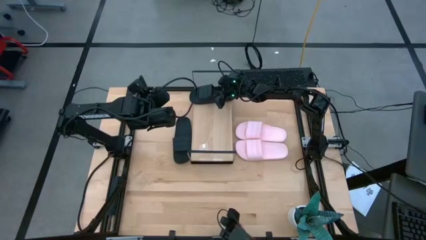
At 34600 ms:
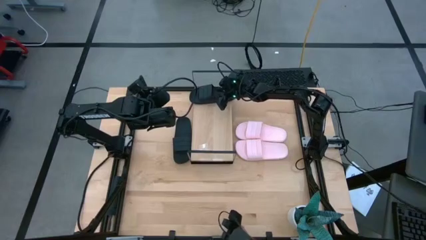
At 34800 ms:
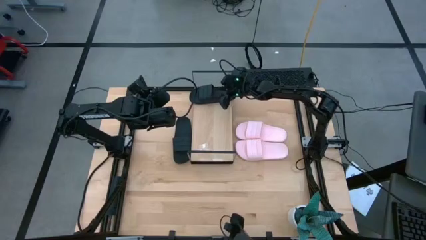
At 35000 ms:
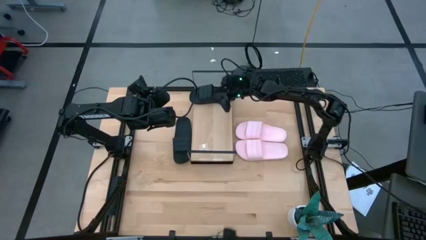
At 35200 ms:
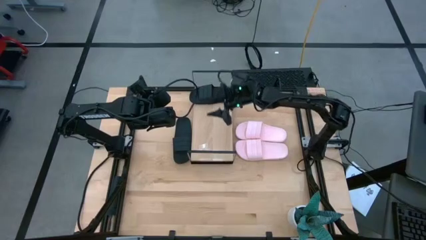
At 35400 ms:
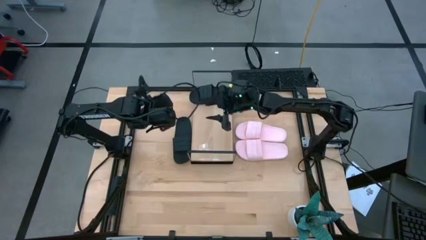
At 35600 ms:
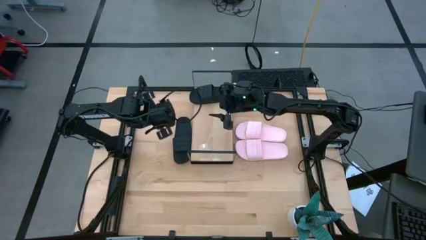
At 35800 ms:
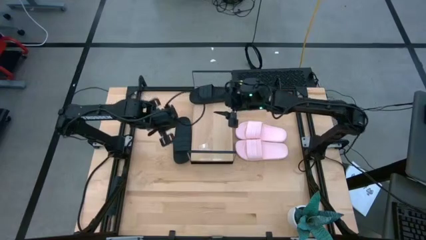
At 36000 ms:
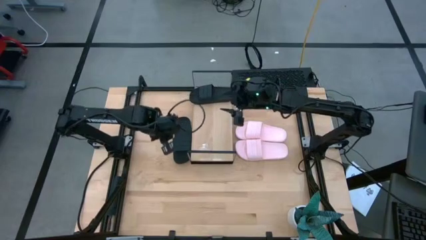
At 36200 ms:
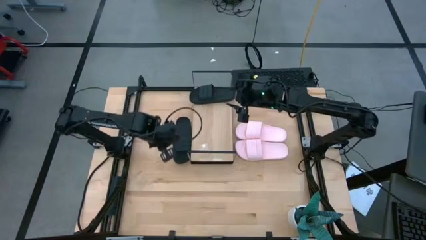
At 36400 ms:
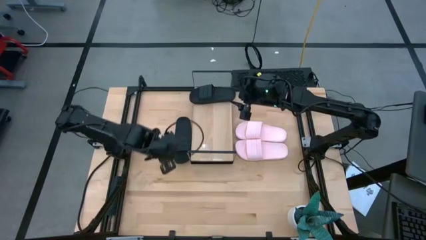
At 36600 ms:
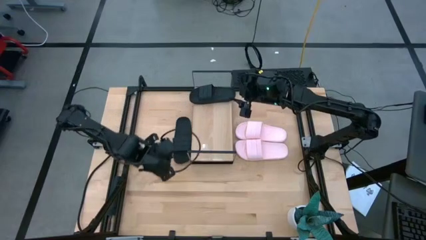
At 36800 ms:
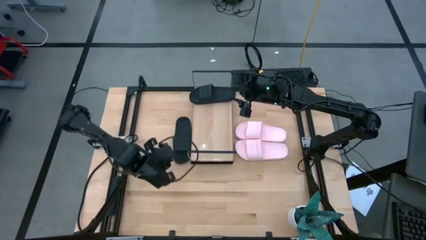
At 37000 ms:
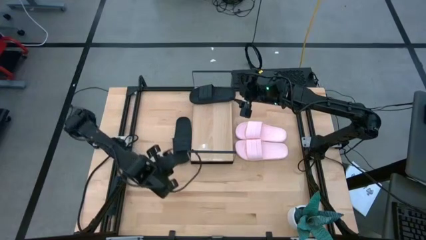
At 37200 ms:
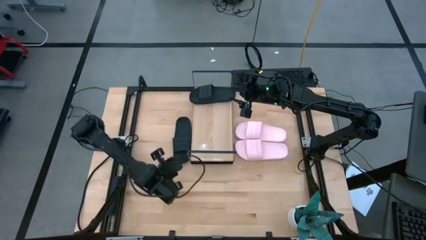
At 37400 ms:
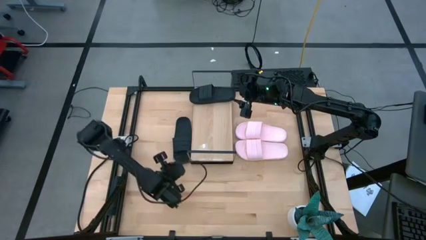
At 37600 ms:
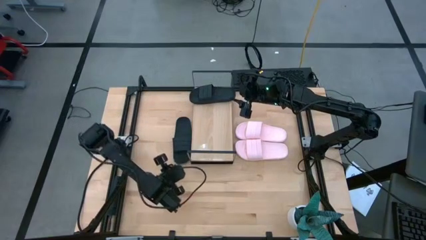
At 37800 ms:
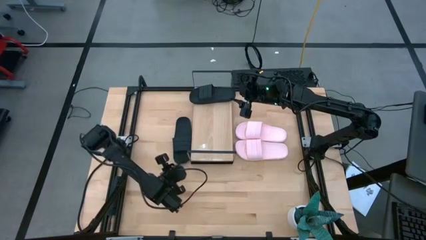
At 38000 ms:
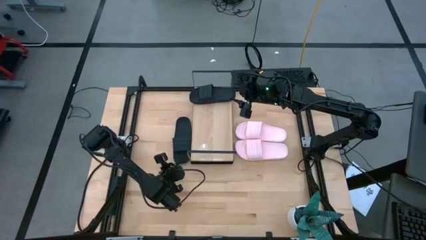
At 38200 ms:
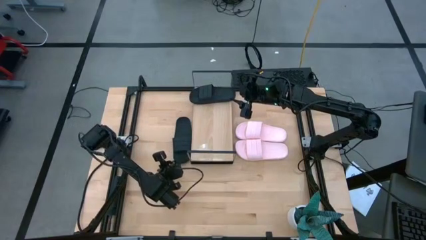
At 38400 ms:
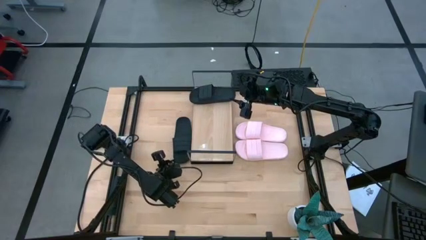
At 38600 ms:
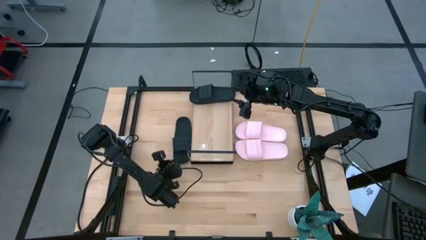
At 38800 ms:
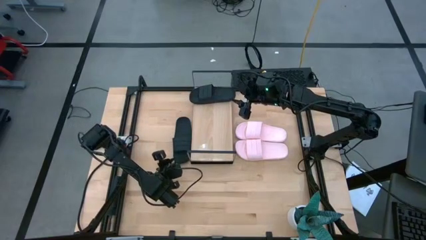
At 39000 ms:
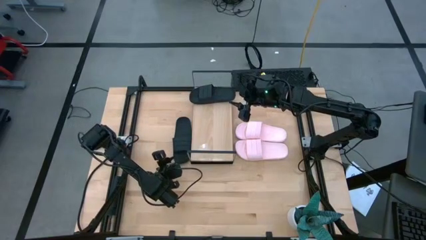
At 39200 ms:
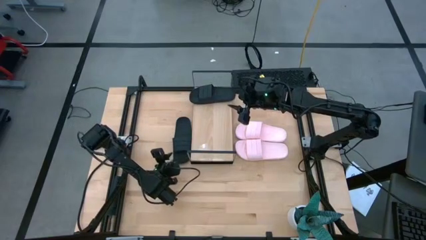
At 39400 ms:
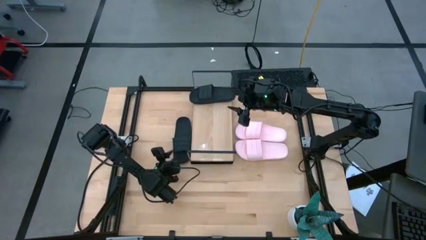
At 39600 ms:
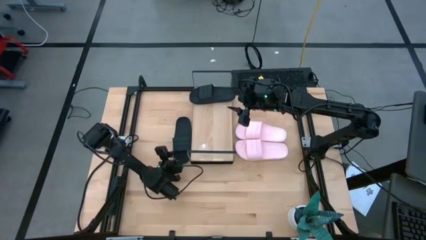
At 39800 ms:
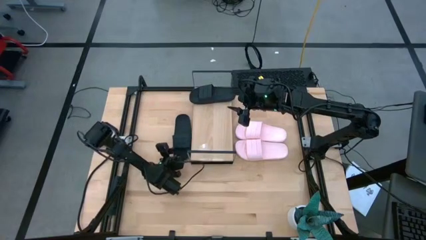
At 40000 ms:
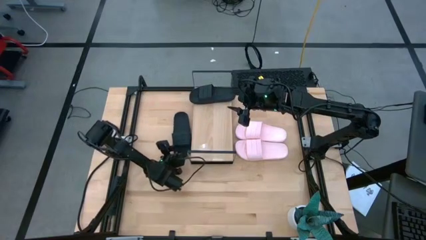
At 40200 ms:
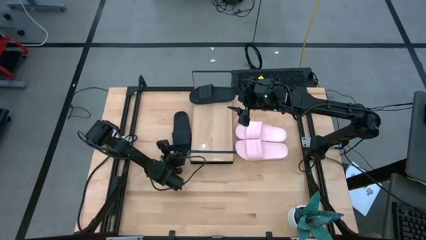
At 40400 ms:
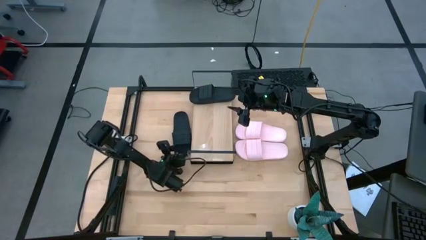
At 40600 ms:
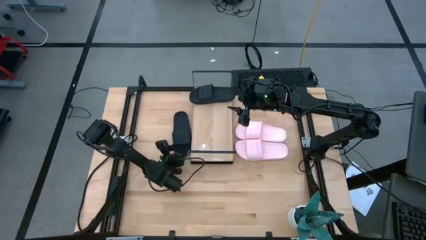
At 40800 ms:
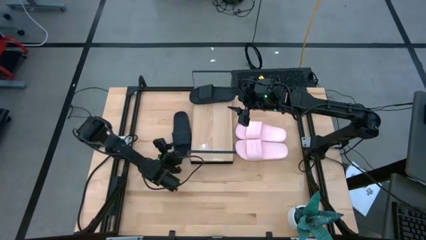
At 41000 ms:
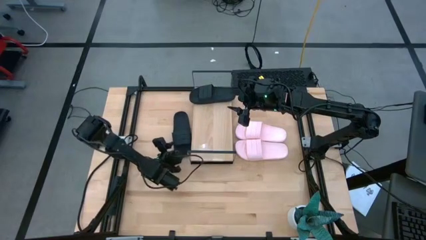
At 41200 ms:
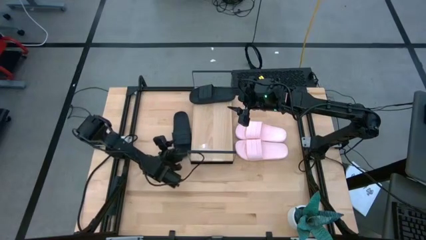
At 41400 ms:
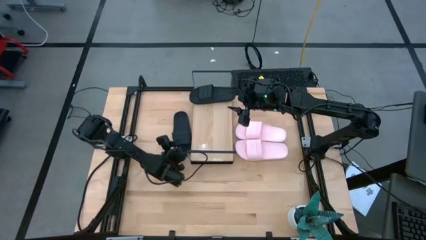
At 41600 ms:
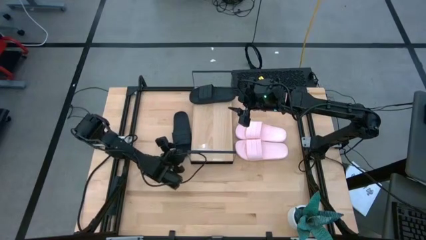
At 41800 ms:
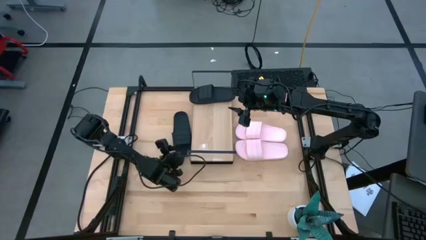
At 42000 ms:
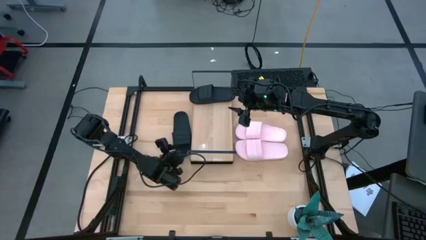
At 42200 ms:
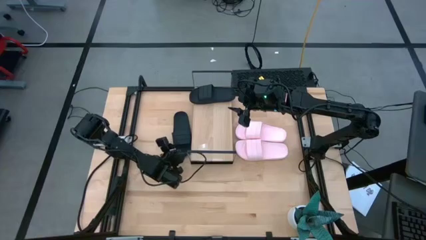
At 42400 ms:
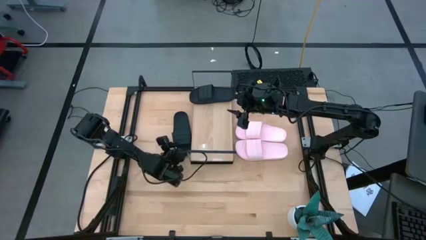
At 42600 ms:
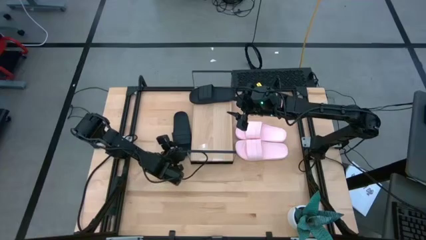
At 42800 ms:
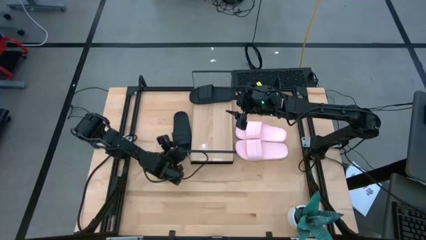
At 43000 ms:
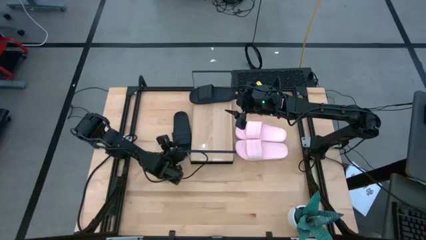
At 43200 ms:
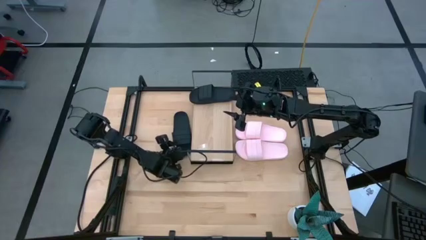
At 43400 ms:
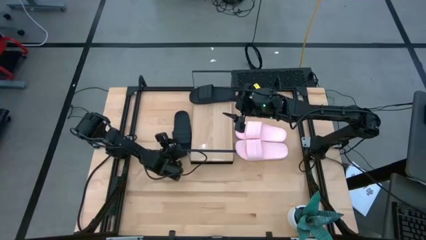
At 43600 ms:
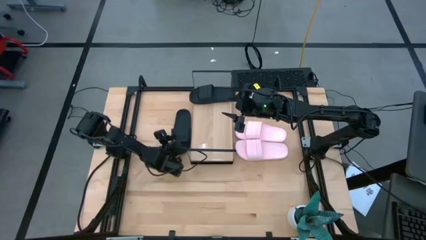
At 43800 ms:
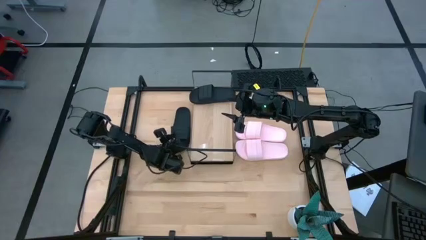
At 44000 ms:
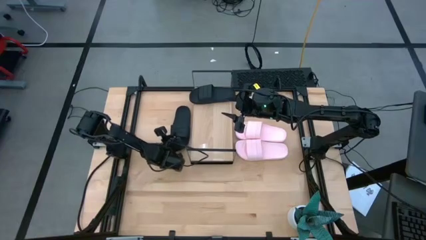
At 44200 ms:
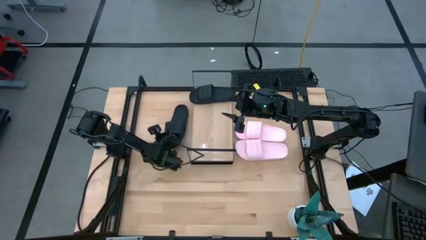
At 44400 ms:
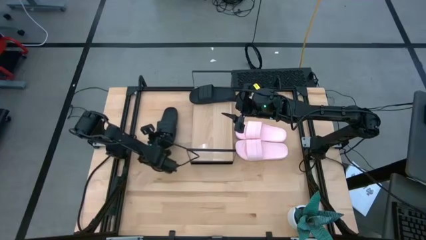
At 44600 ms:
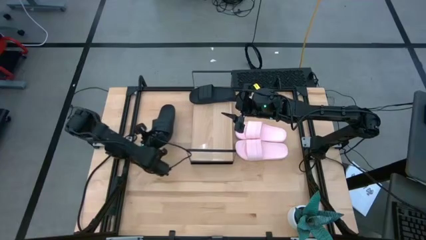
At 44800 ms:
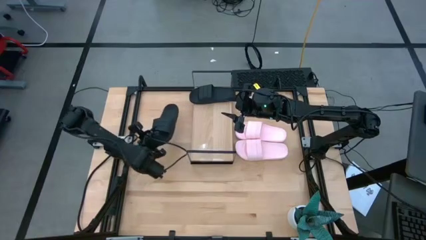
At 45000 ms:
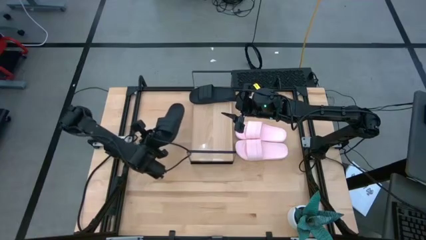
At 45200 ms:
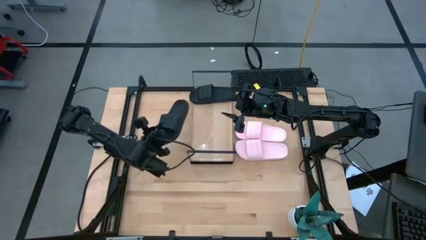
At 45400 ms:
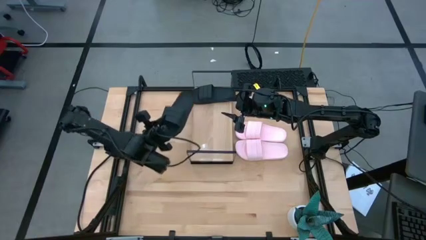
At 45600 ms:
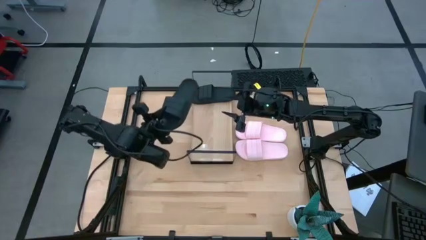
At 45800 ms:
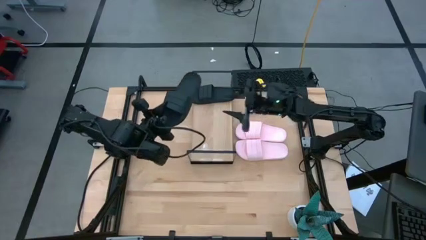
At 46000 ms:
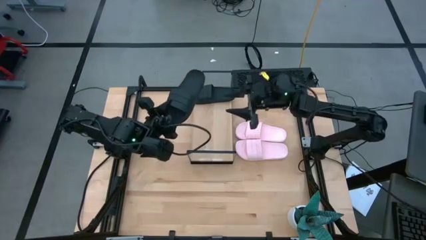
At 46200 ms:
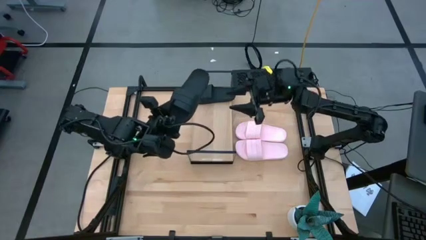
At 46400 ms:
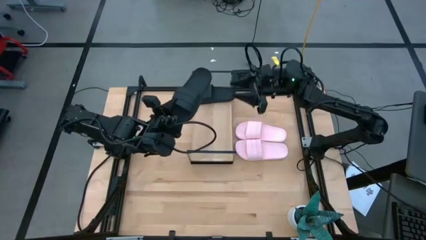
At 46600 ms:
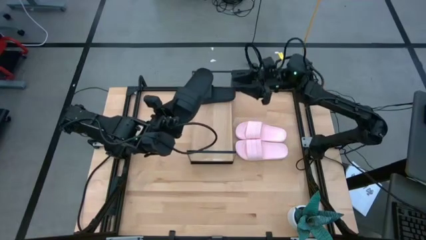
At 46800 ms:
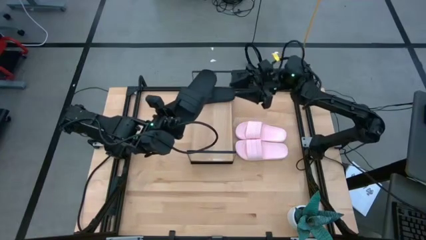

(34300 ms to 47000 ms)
Task: Pick and place slides into the shelf
Put the black slide on the shelf
